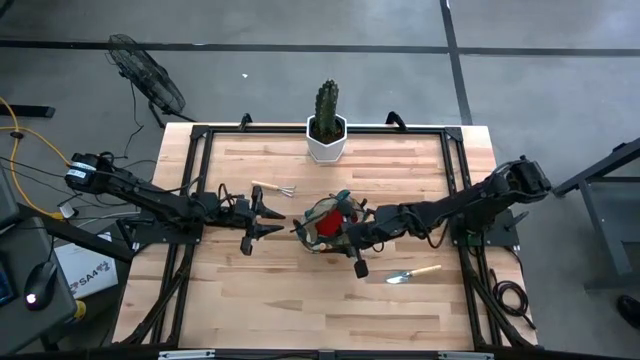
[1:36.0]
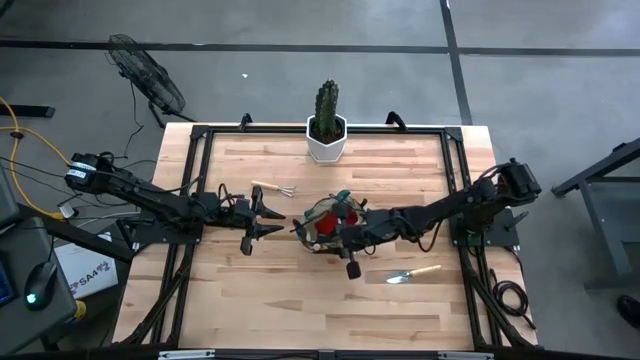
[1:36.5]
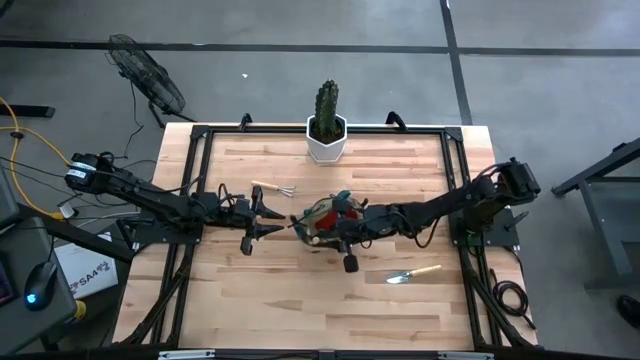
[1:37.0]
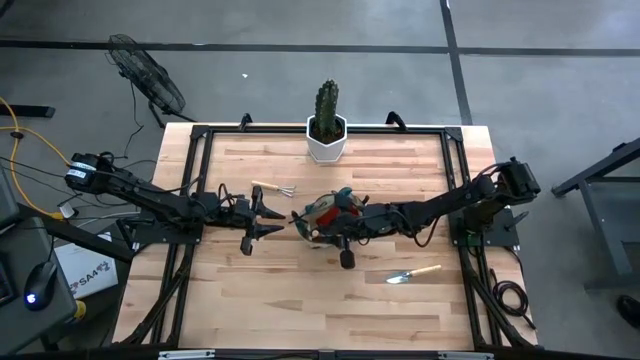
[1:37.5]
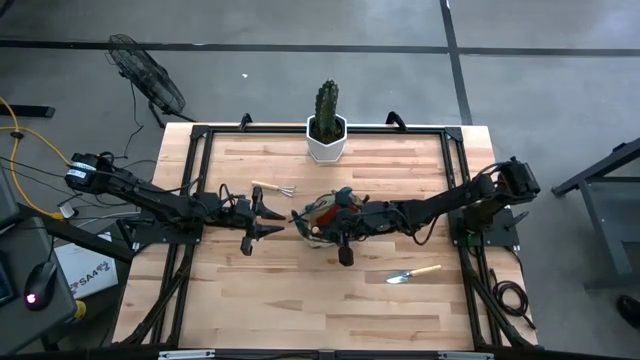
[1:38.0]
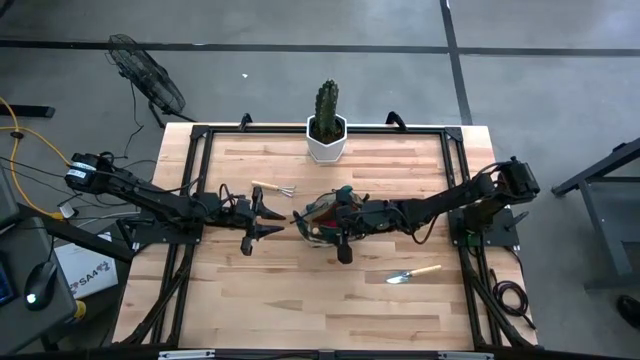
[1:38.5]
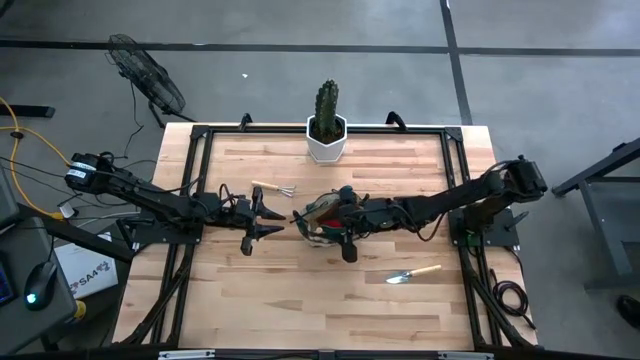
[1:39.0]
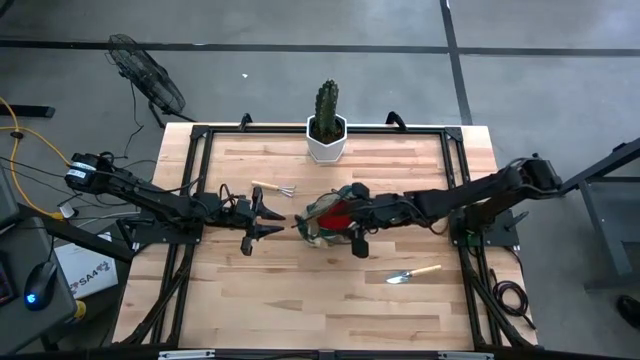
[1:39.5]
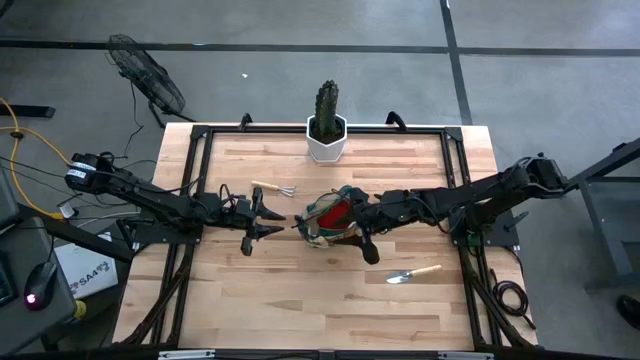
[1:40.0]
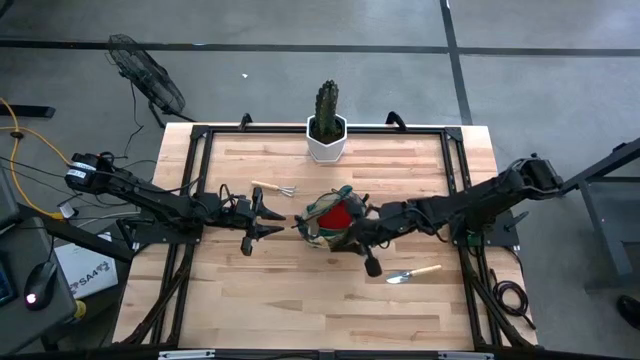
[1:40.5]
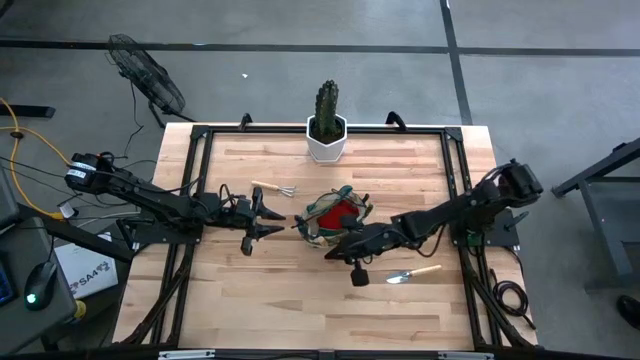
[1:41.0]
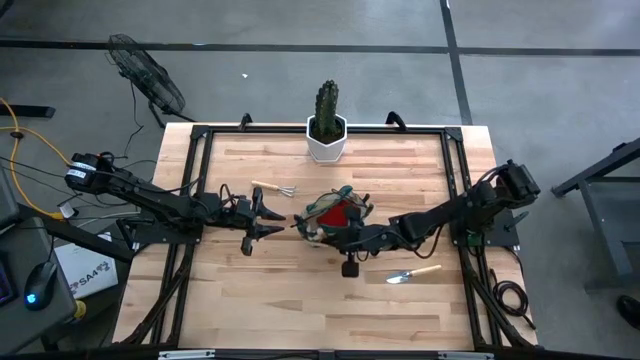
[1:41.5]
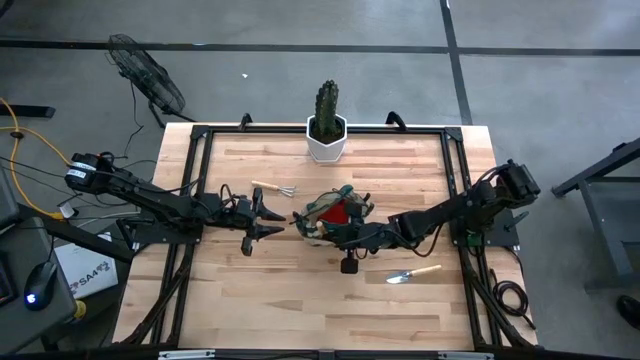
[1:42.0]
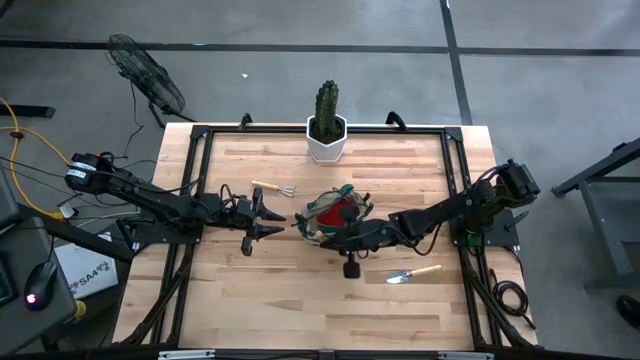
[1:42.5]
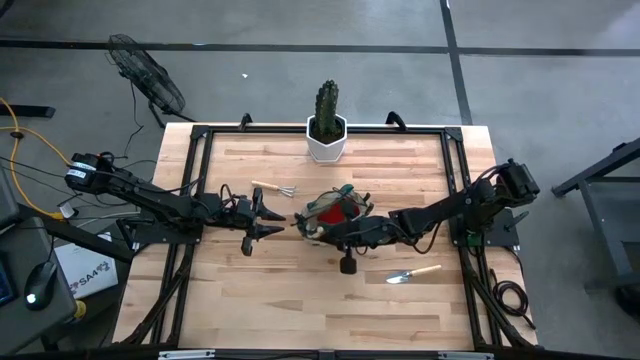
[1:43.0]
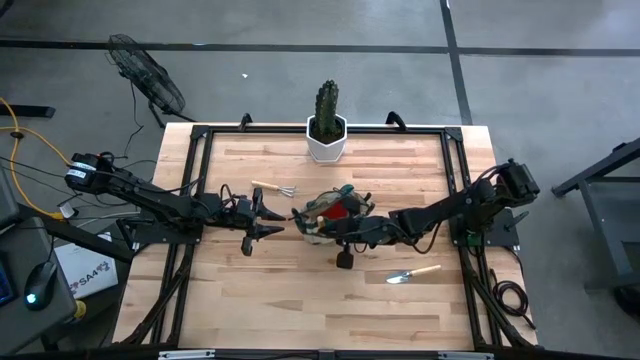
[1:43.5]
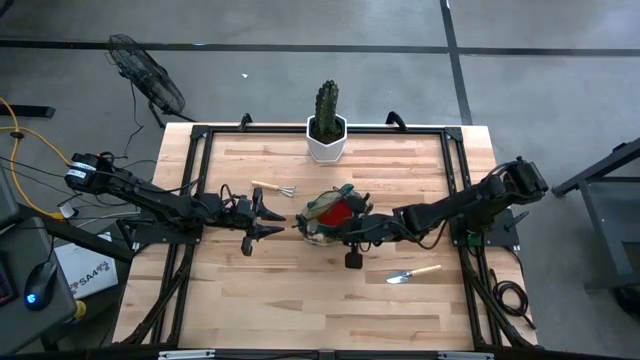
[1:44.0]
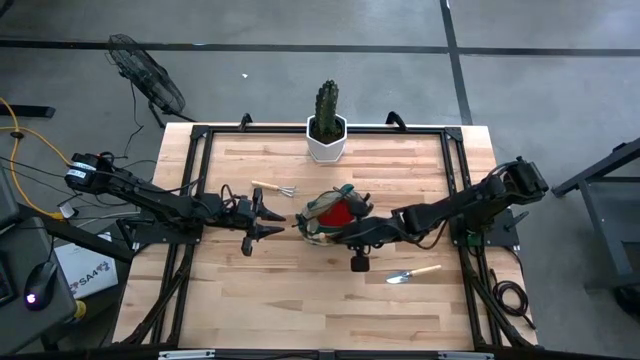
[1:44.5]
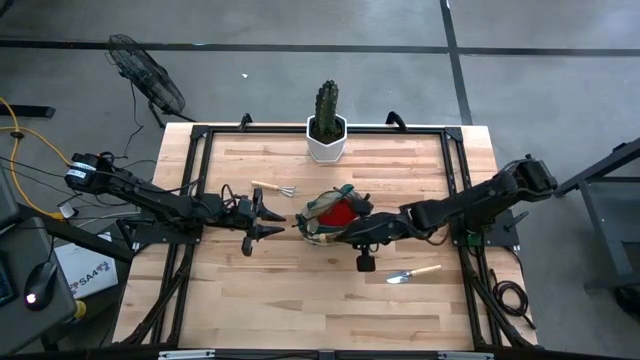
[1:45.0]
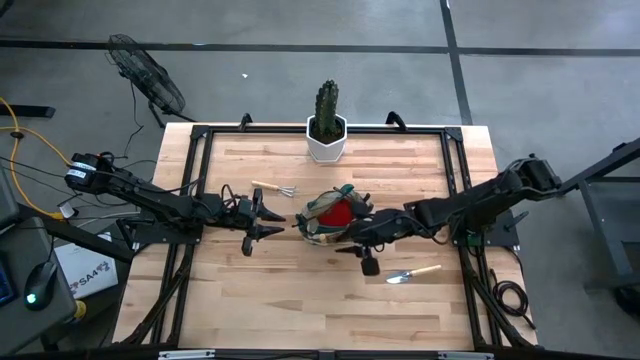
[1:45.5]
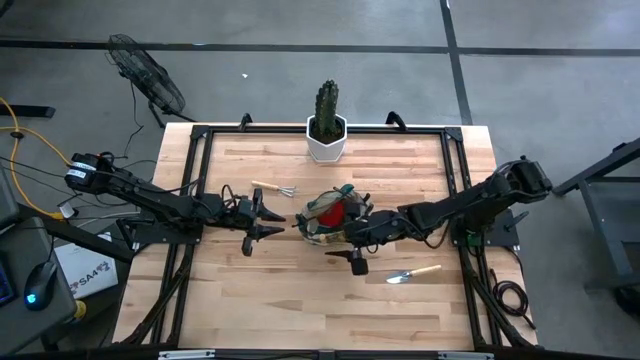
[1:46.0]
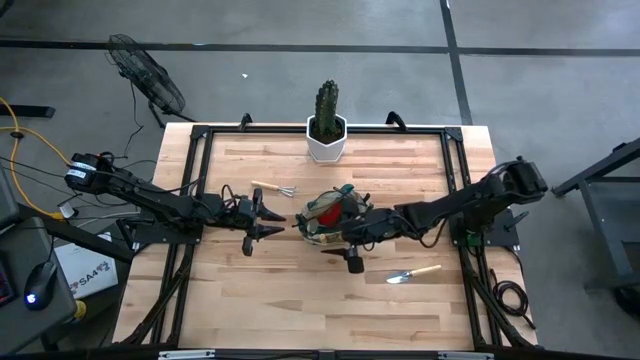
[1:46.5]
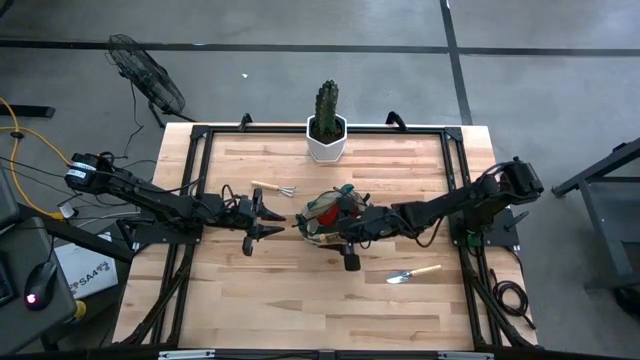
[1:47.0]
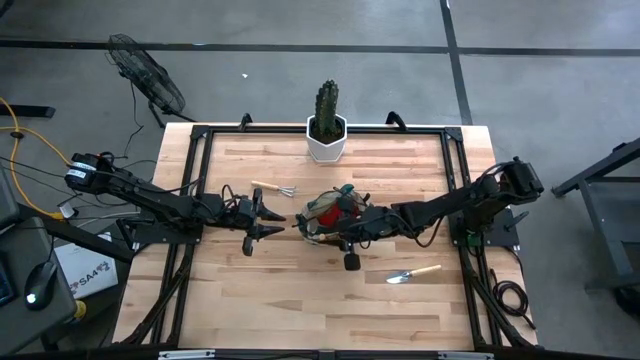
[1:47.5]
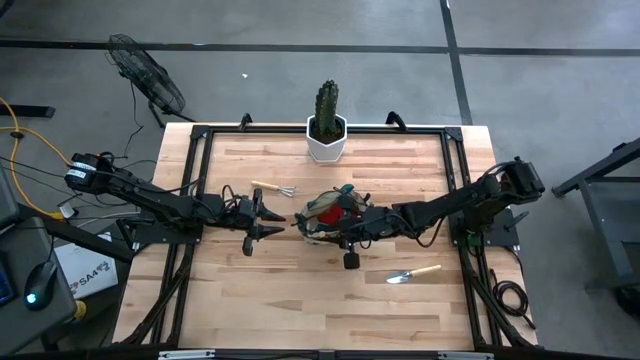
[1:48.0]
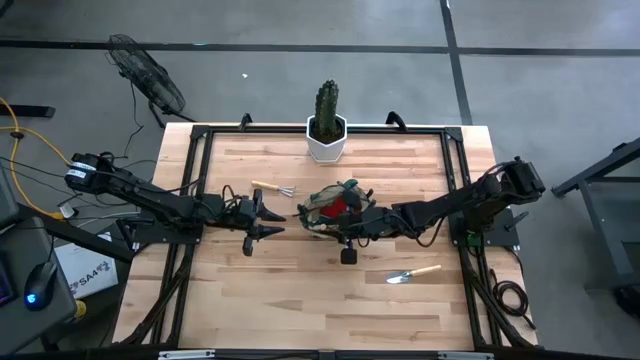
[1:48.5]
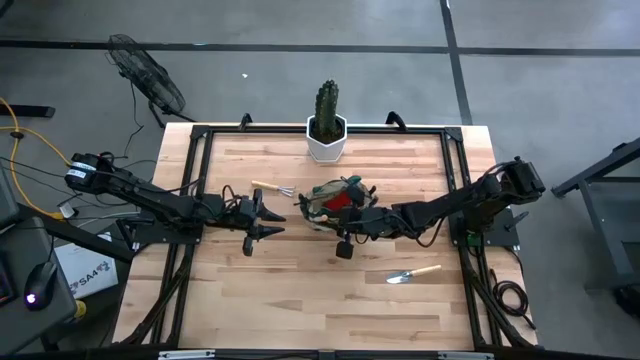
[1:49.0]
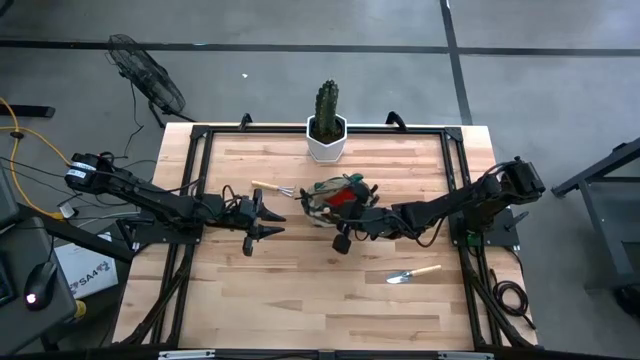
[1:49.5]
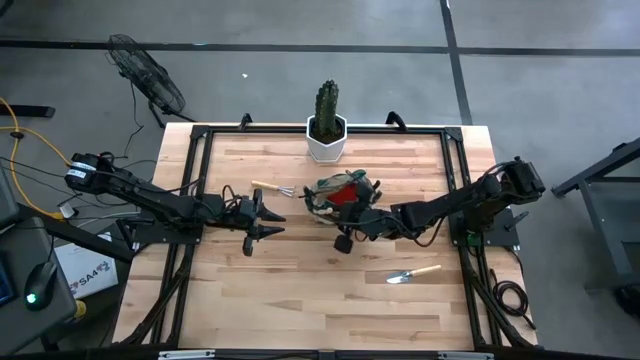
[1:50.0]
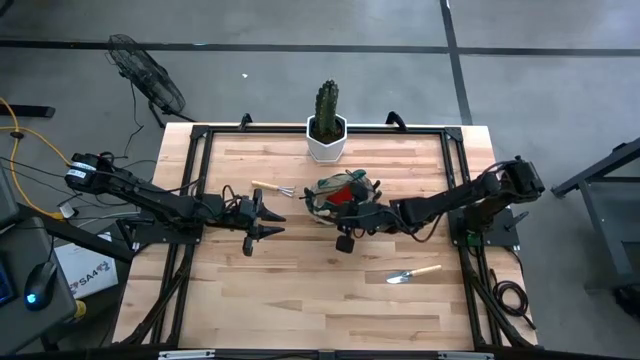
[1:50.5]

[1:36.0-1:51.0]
Task: Pick & Place Garden tools in Gardening bag
Put the brown trowel into the brown gardening bag

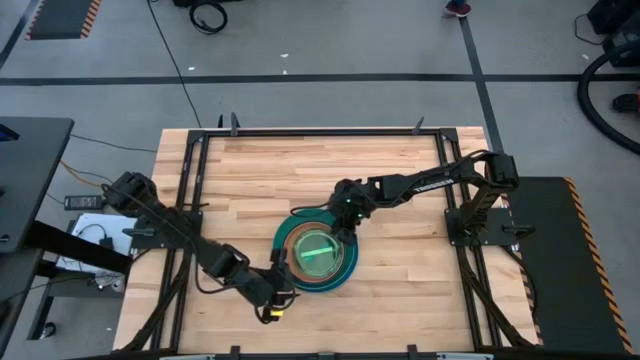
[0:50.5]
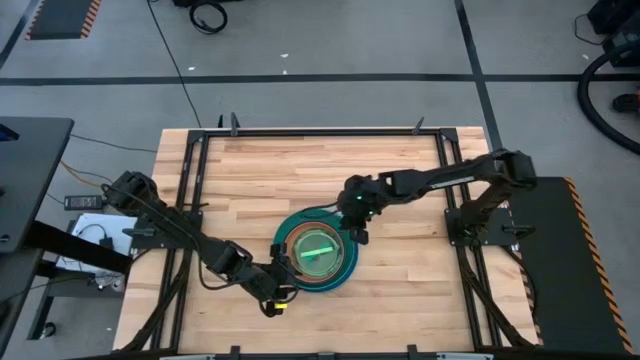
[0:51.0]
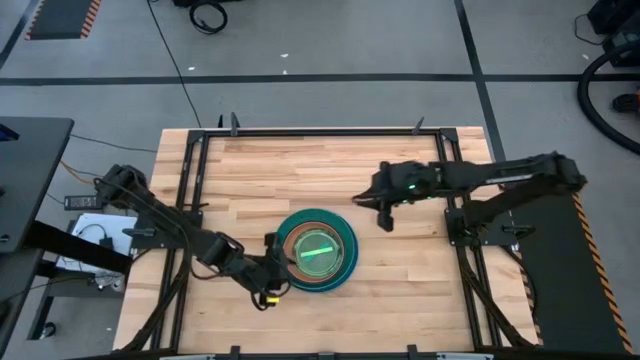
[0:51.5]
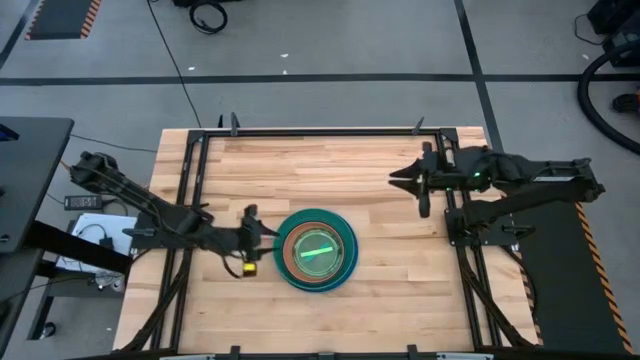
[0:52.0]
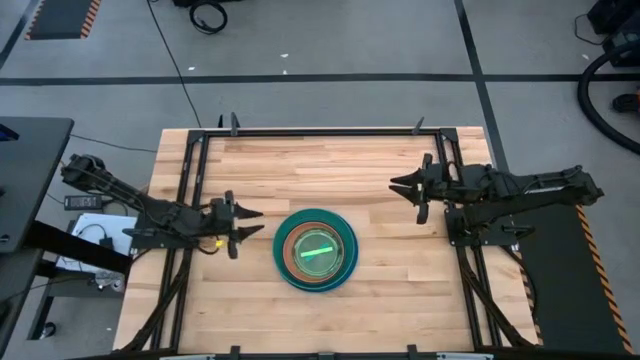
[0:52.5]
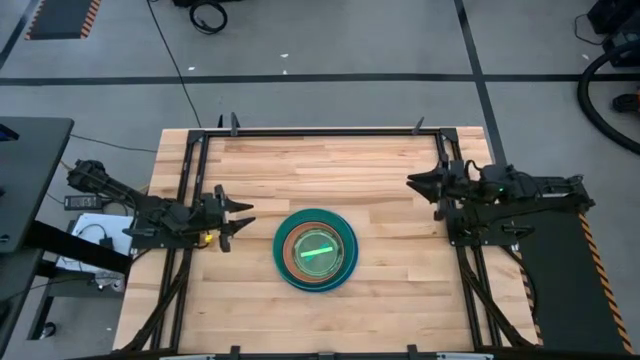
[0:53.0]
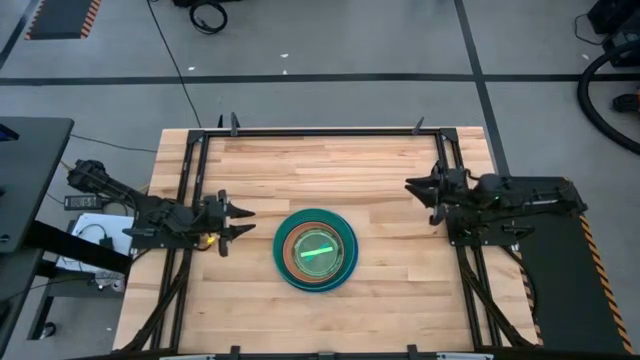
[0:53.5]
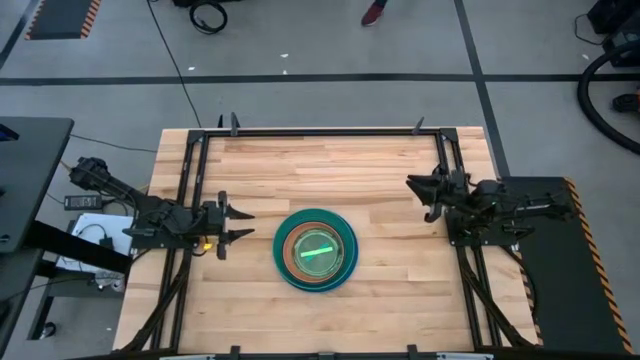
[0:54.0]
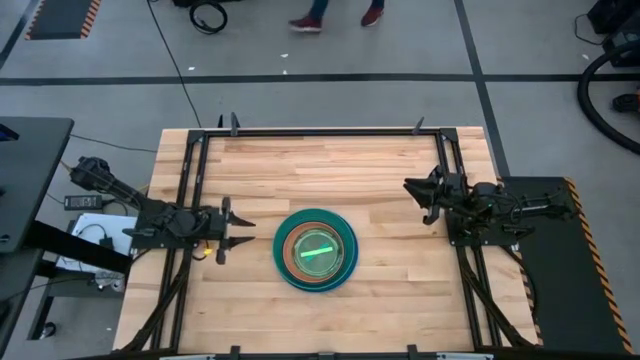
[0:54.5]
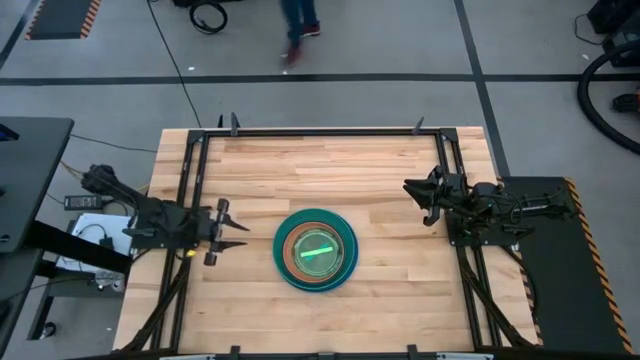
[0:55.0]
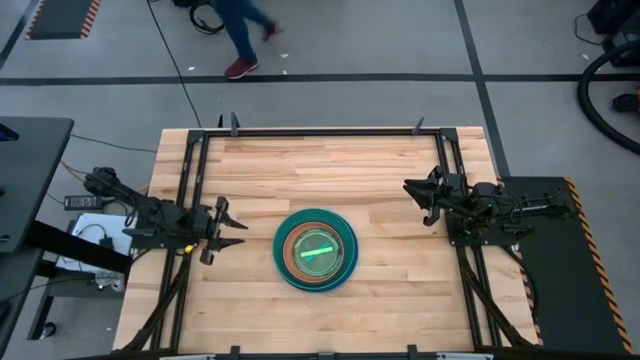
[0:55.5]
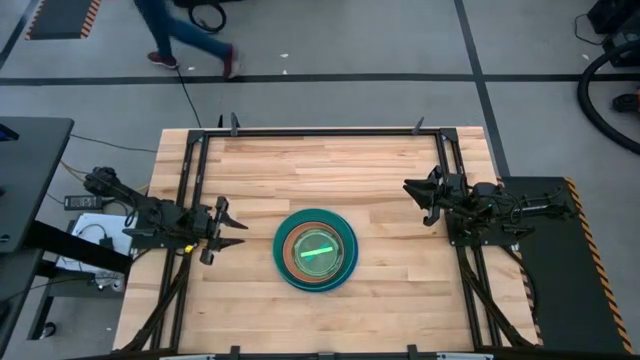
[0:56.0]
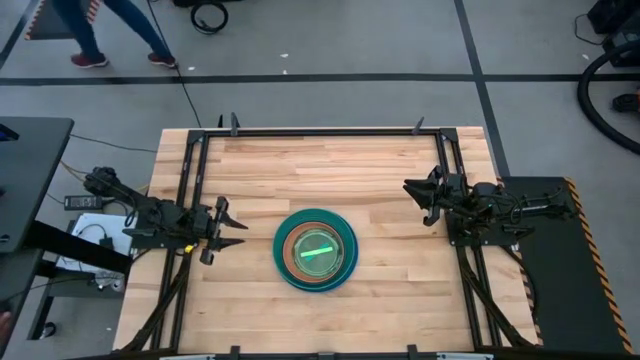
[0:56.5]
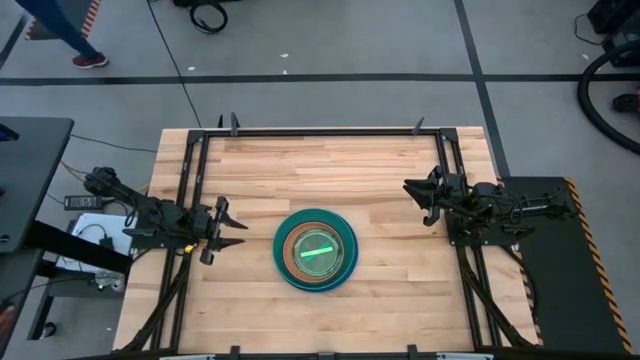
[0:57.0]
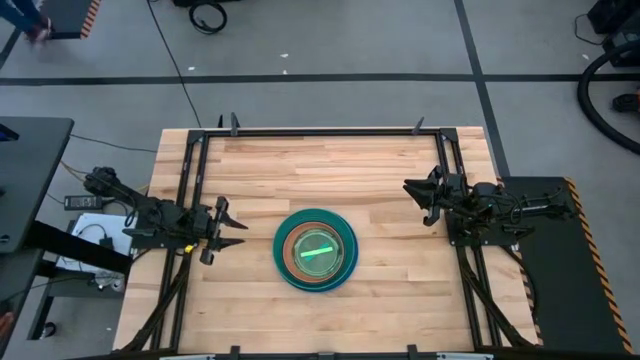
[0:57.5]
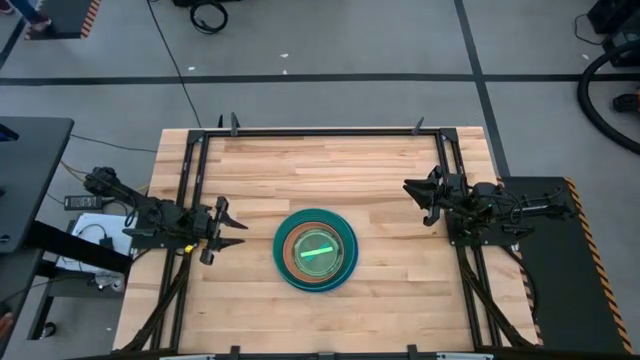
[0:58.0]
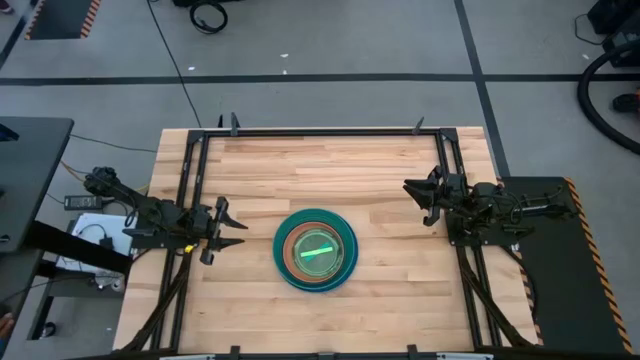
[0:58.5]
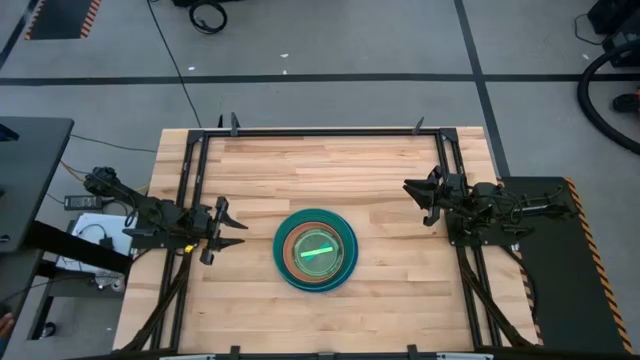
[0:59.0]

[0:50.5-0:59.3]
Task: Stack plastic plates
Return to Home Position
